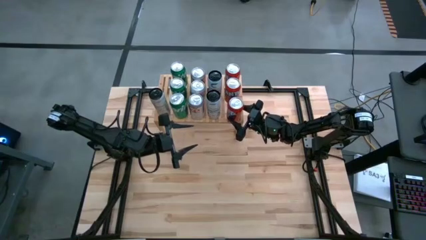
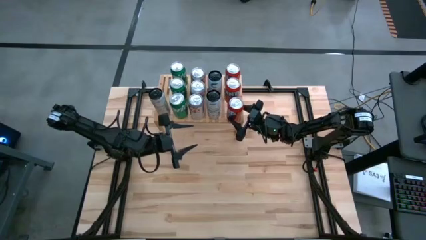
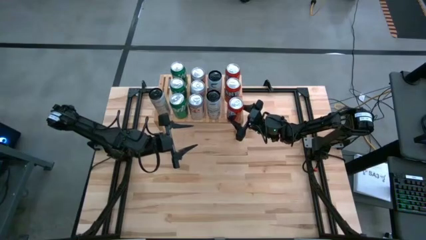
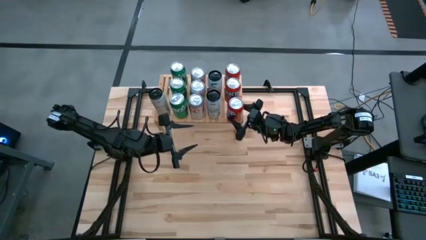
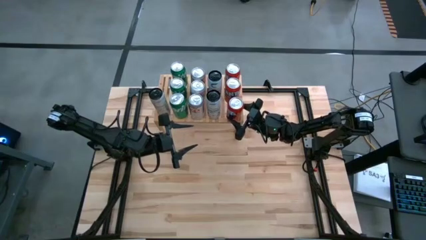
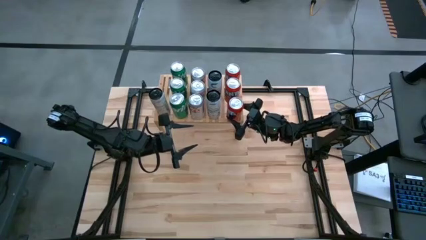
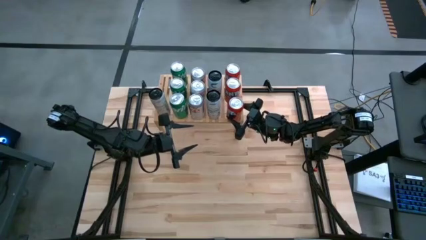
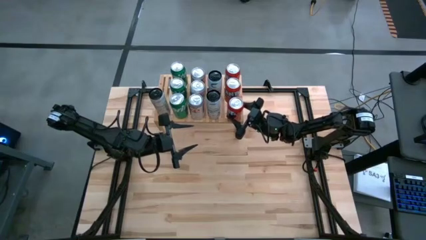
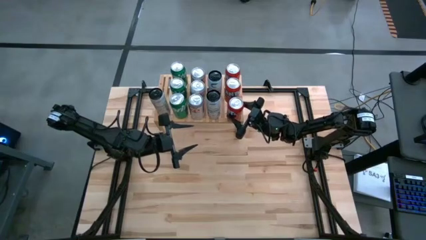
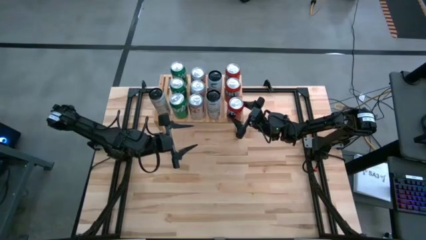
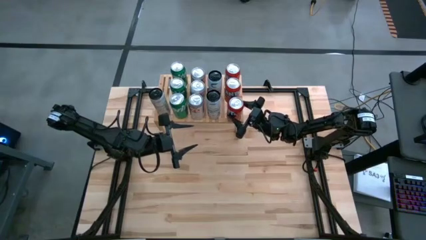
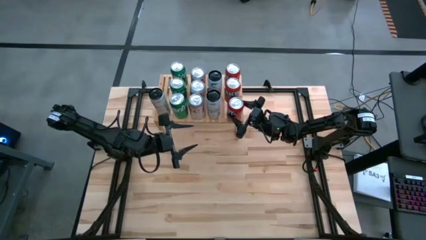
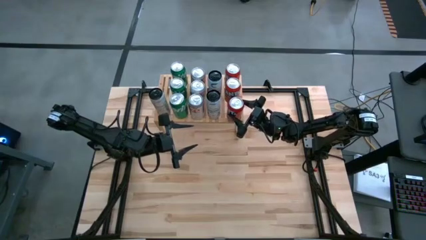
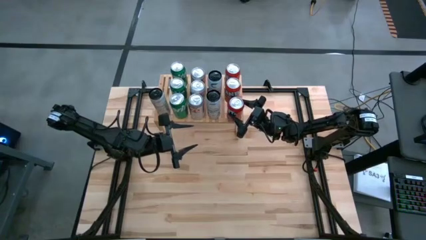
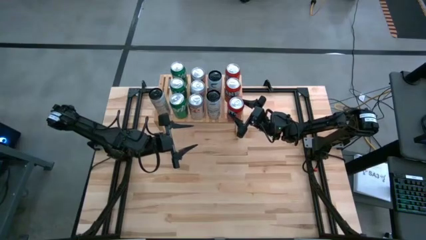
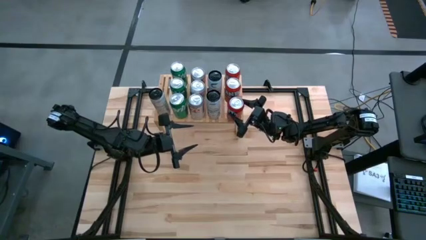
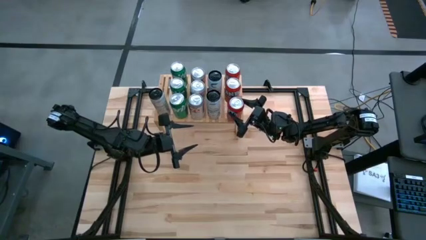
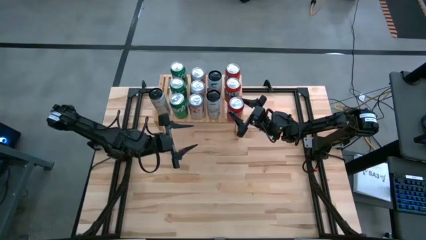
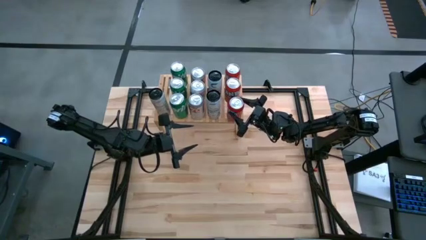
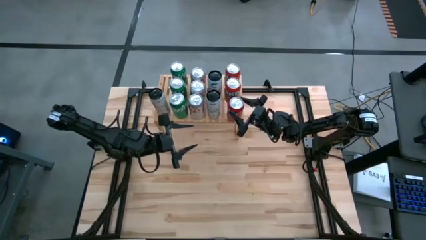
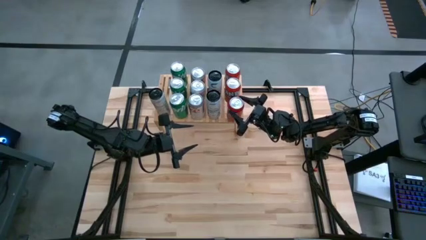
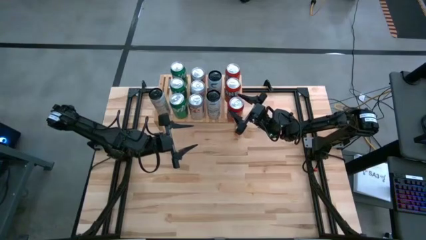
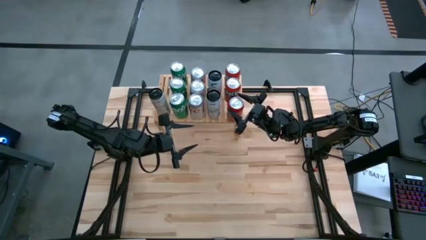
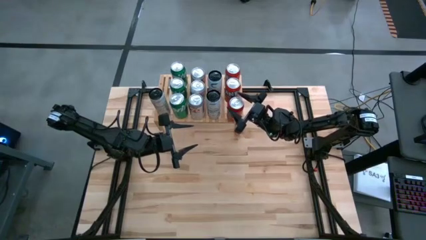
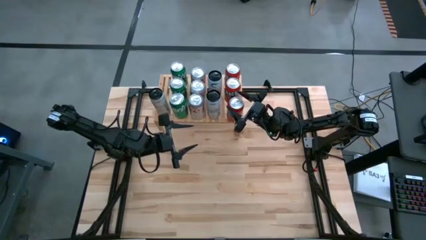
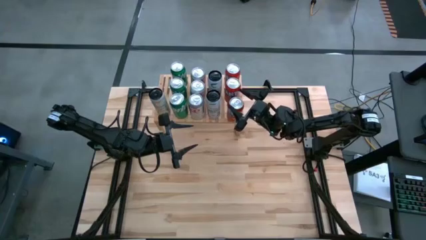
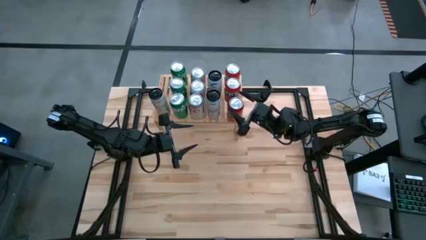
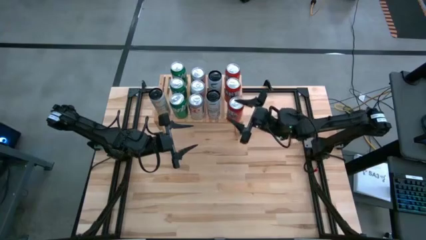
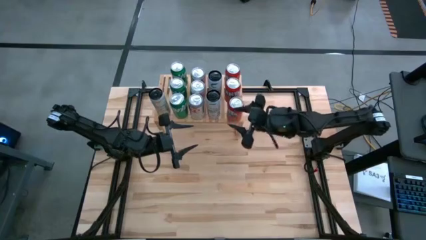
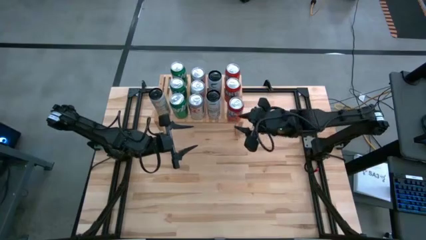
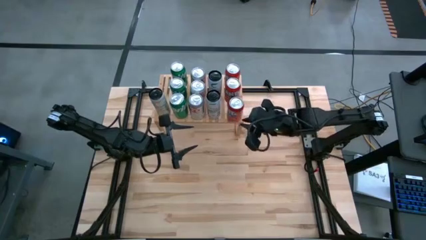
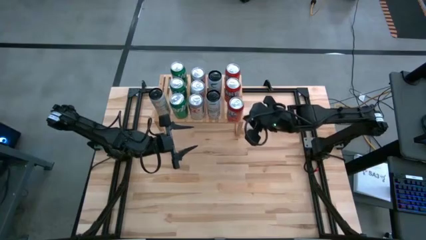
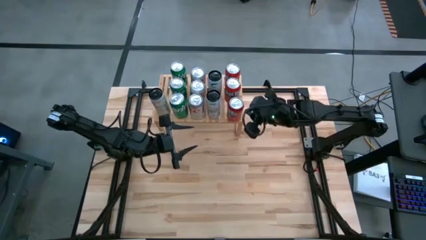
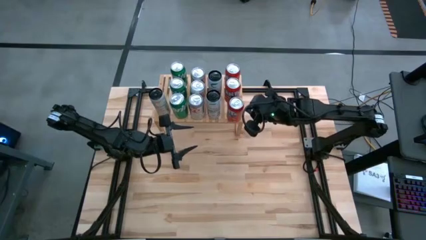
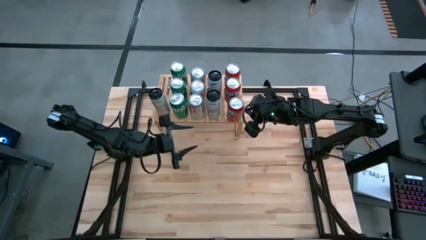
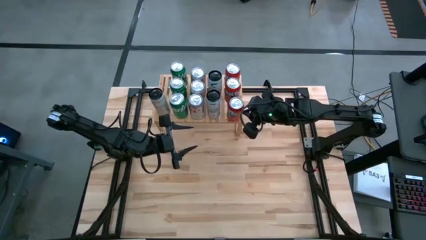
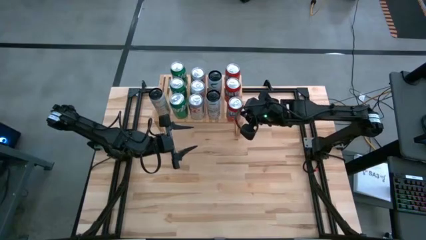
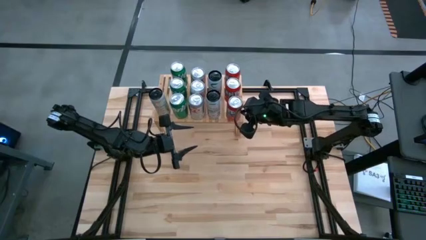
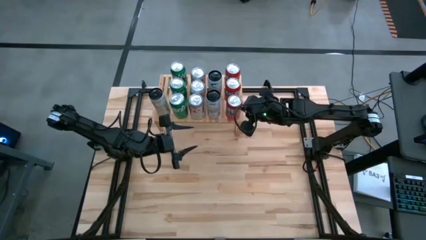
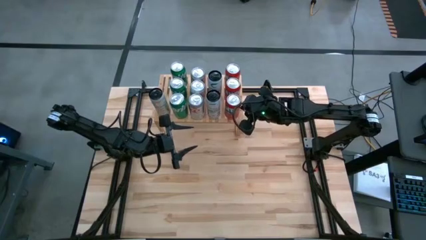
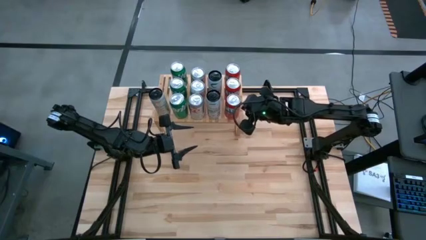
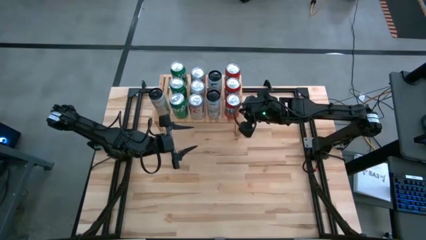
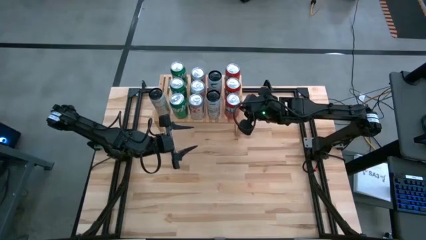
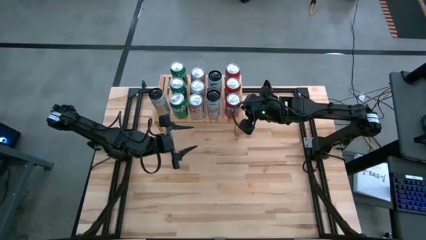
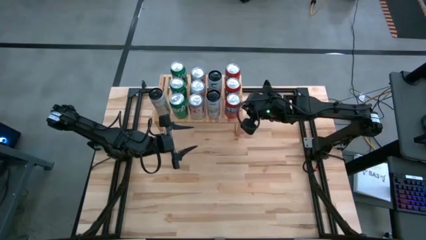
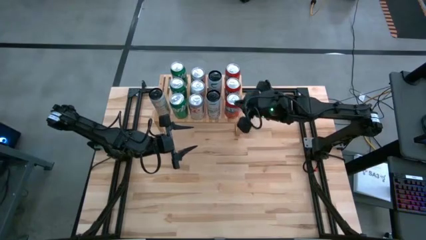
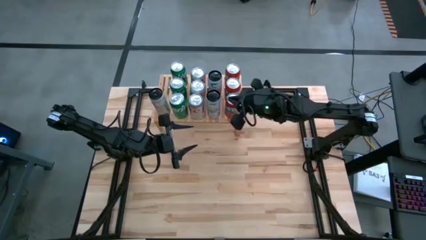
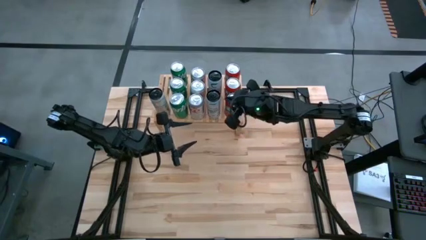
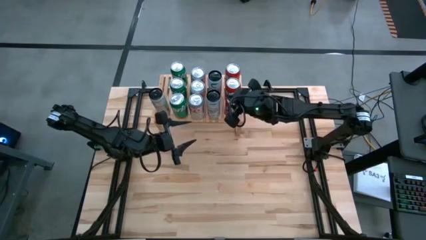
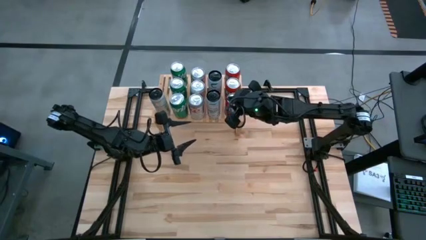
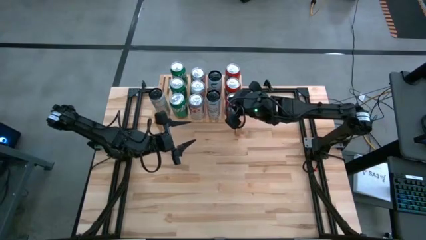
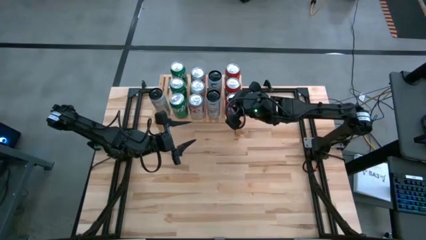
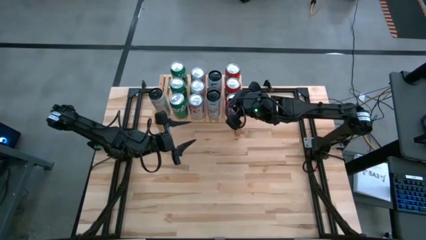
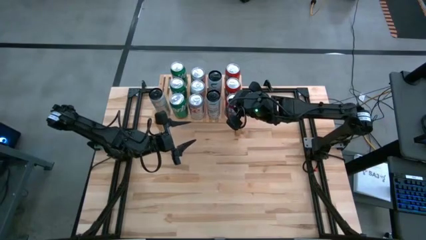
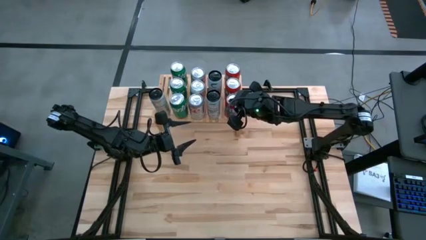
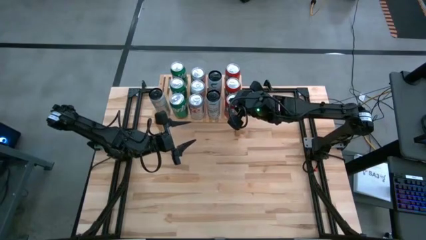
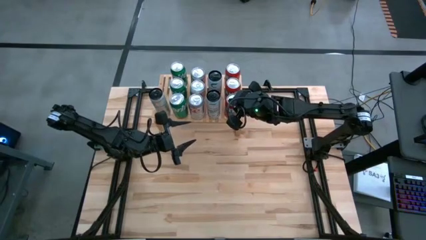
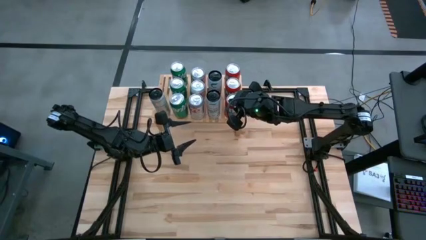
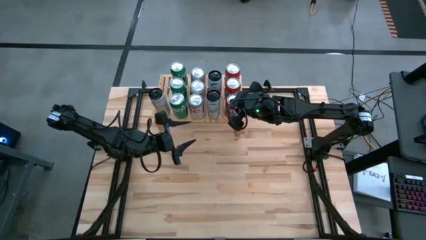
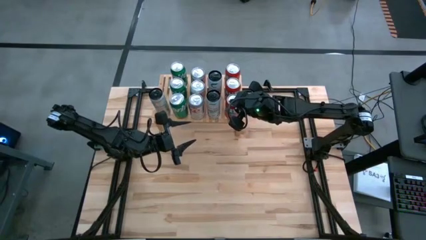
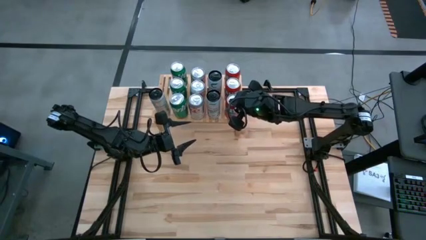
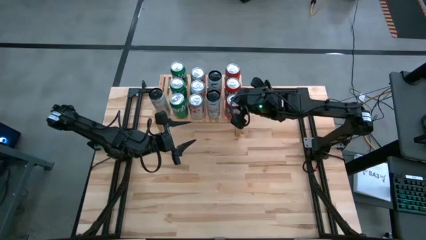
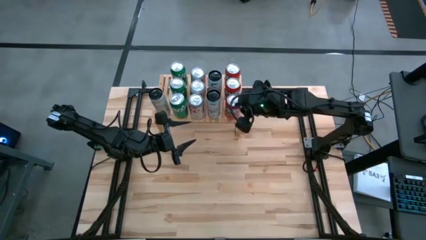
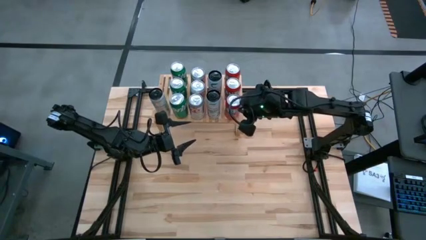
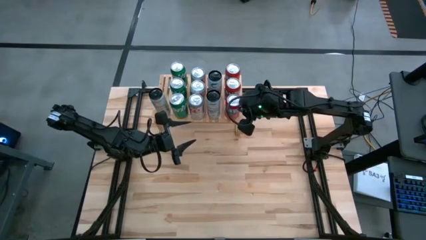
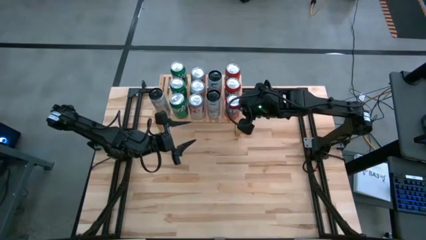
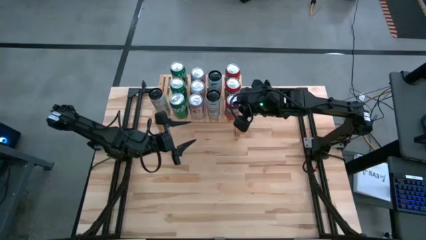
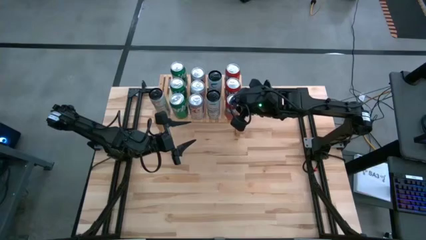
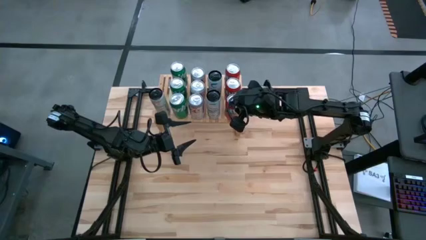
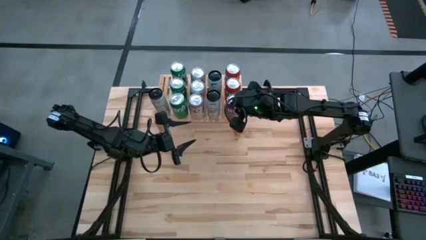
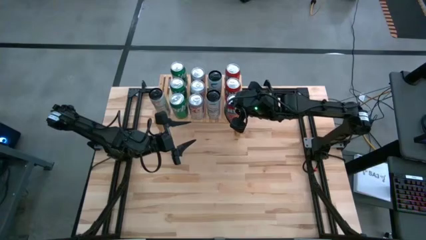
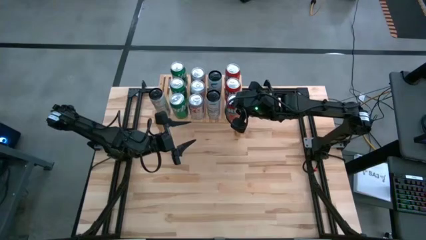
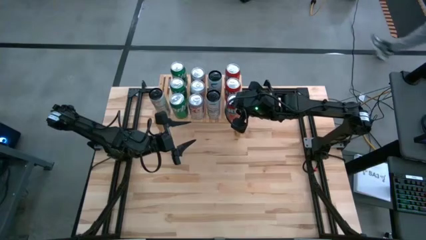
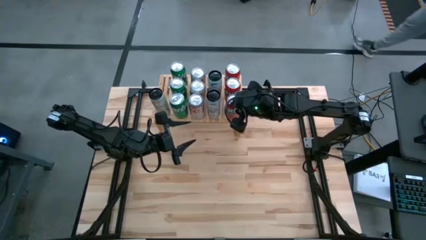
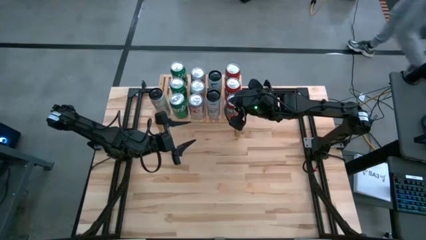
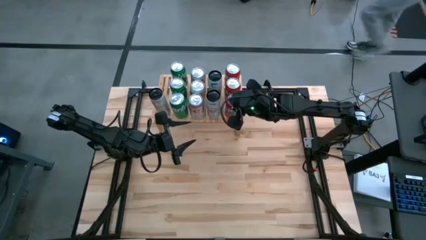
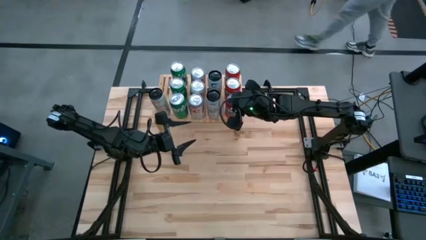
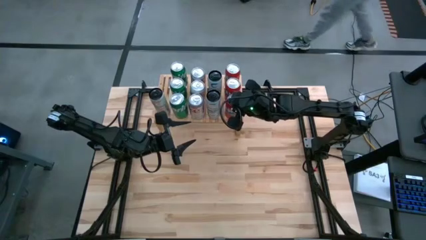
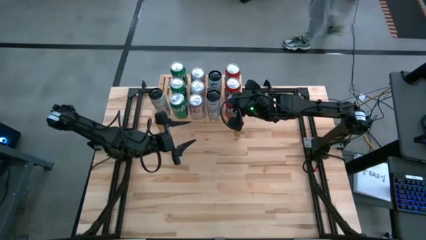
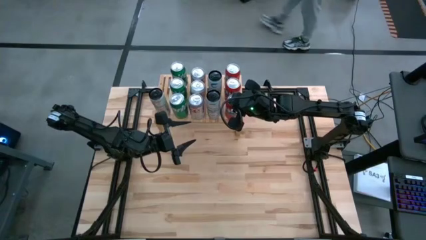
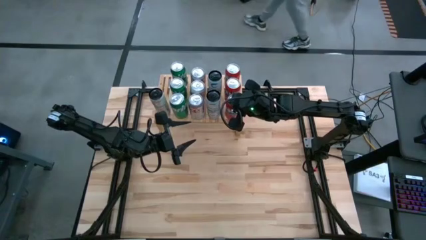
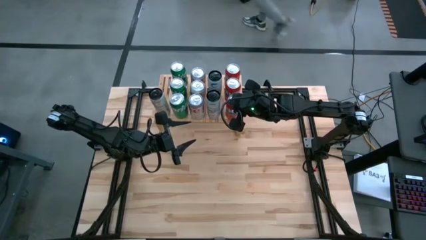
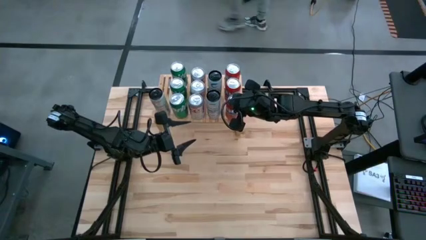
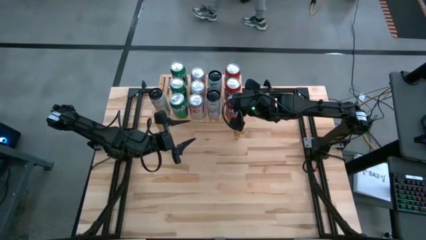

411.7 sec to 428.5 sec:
Task: Place canned beverage on shelf
Put the orange soda can on the shelf
